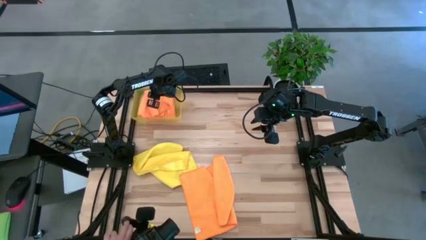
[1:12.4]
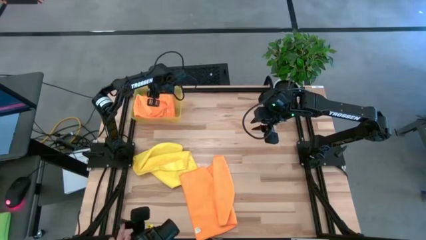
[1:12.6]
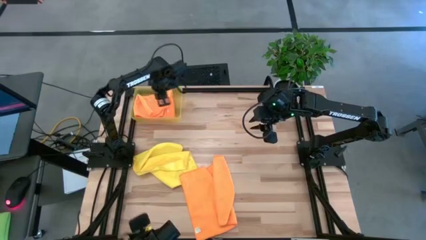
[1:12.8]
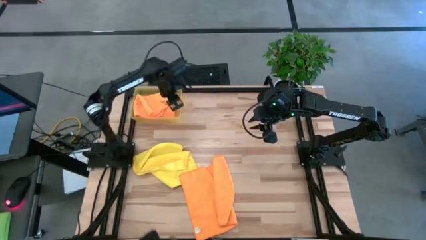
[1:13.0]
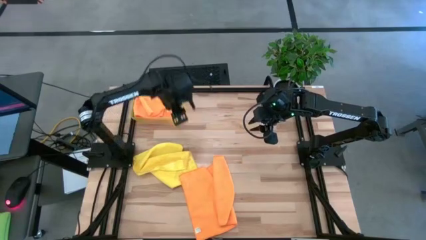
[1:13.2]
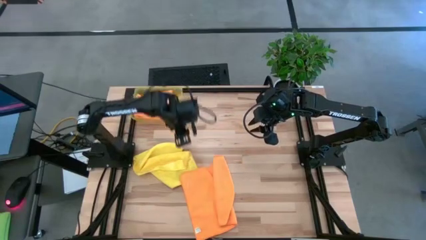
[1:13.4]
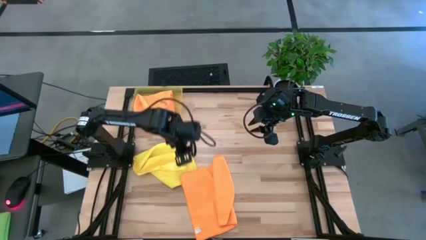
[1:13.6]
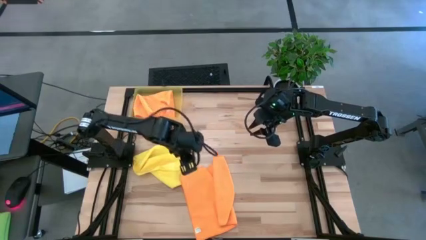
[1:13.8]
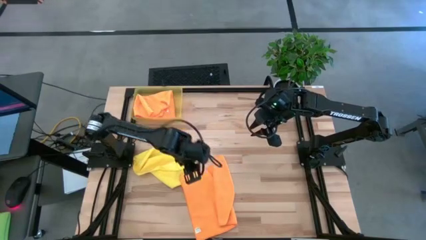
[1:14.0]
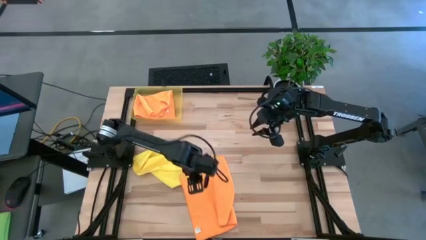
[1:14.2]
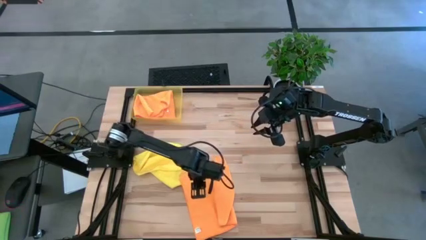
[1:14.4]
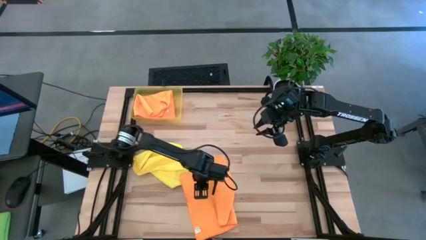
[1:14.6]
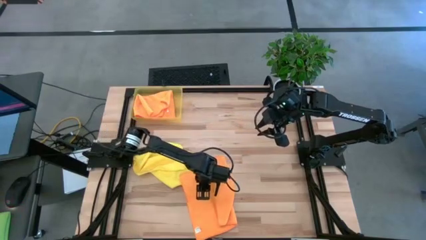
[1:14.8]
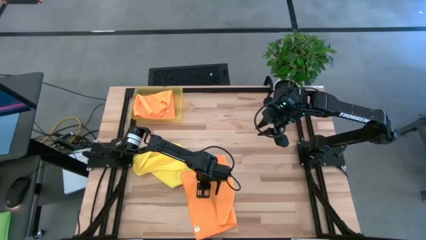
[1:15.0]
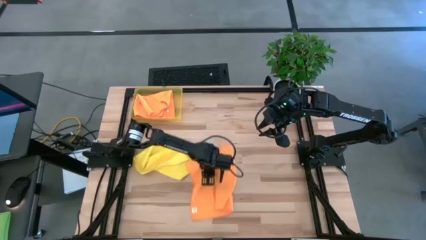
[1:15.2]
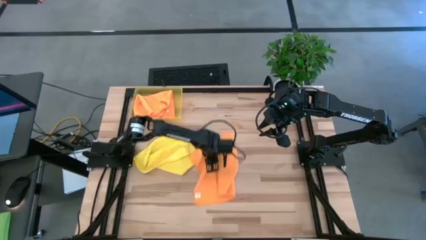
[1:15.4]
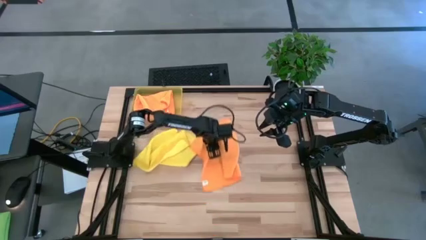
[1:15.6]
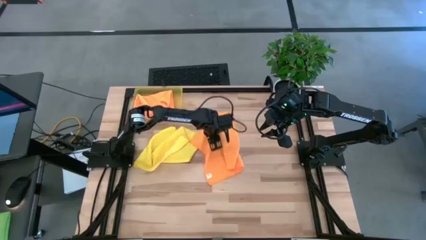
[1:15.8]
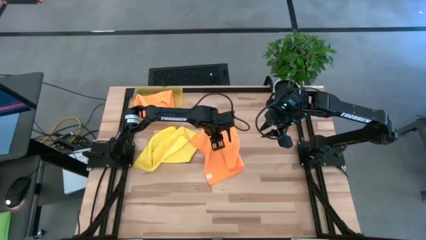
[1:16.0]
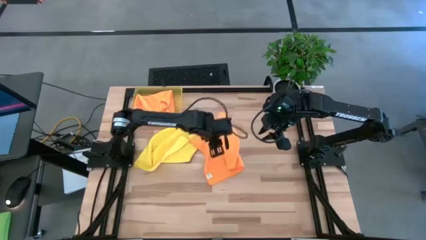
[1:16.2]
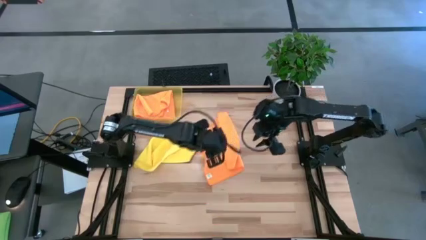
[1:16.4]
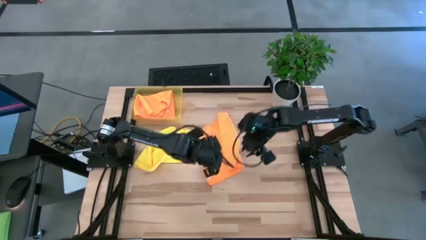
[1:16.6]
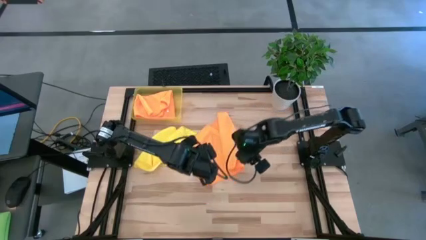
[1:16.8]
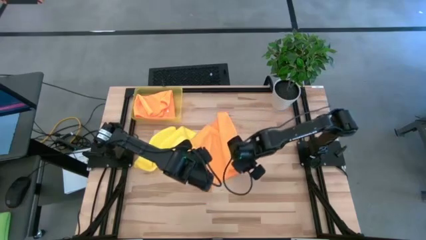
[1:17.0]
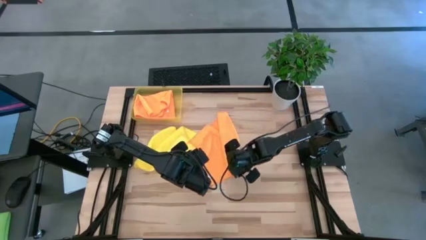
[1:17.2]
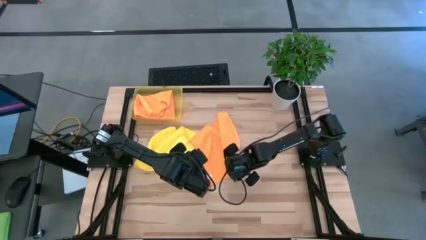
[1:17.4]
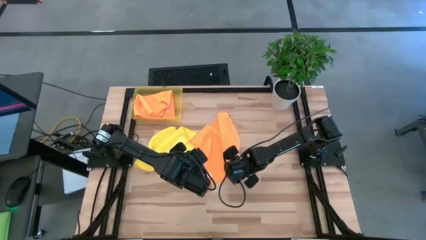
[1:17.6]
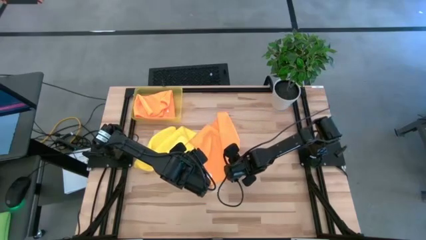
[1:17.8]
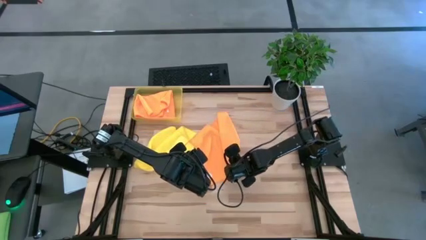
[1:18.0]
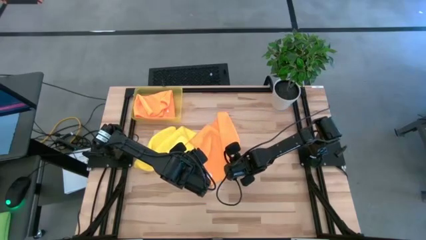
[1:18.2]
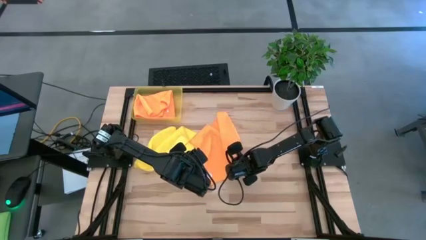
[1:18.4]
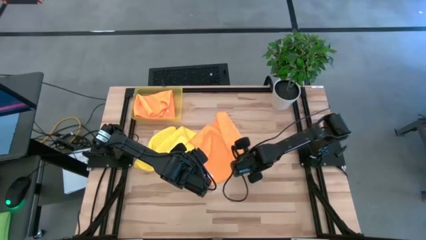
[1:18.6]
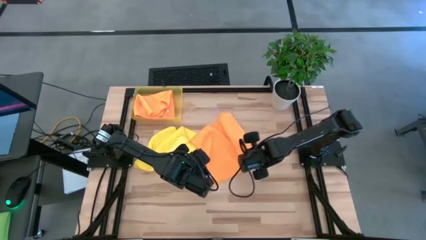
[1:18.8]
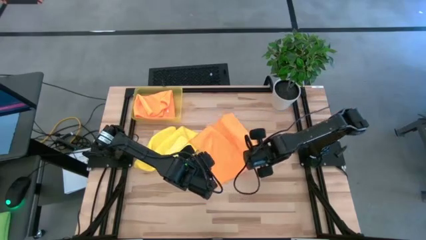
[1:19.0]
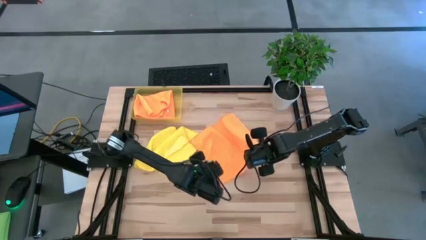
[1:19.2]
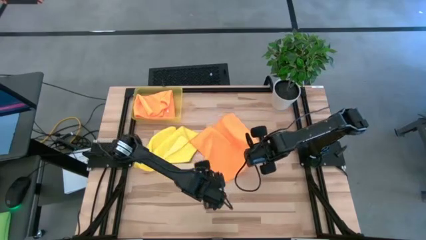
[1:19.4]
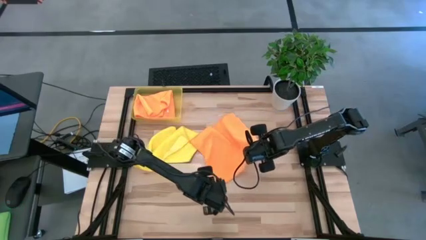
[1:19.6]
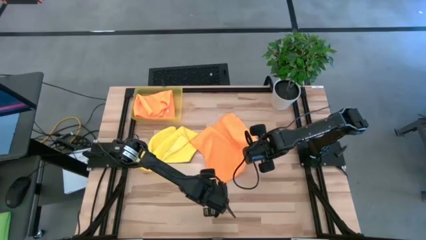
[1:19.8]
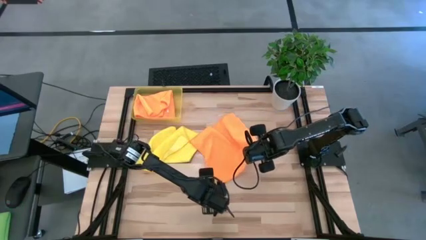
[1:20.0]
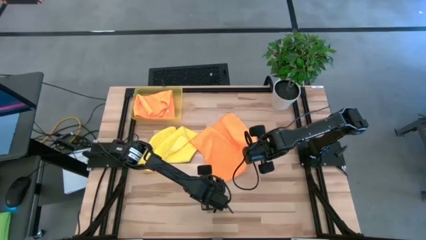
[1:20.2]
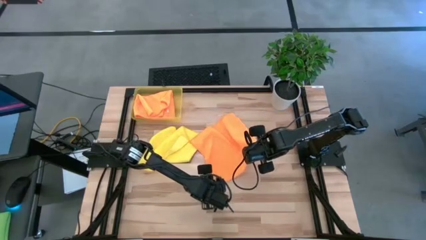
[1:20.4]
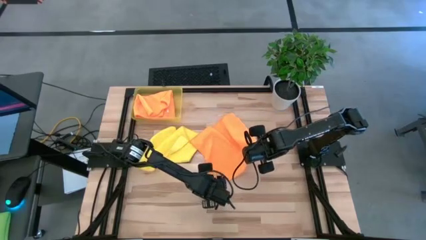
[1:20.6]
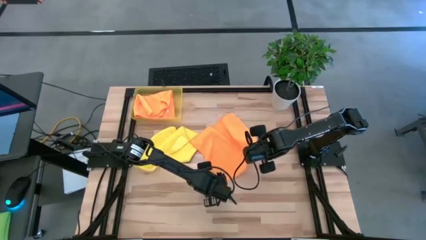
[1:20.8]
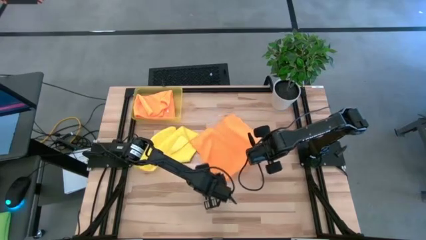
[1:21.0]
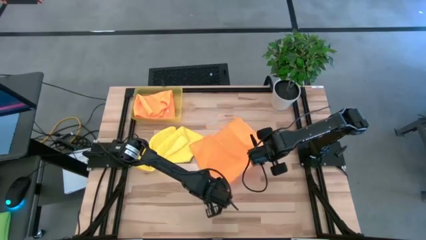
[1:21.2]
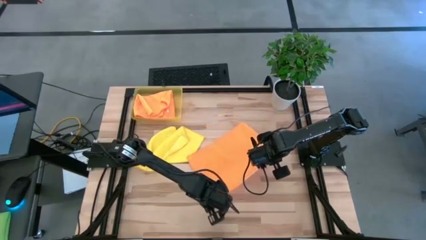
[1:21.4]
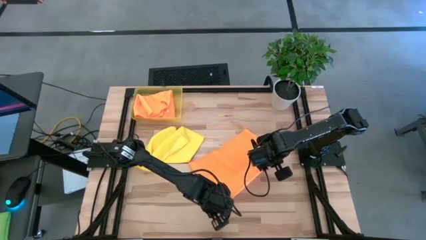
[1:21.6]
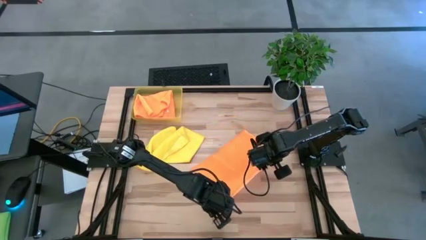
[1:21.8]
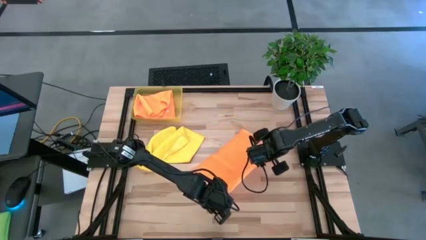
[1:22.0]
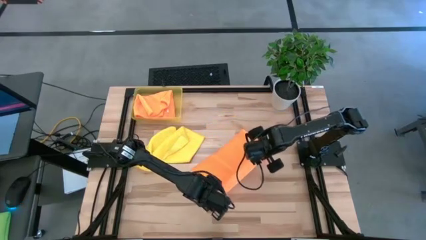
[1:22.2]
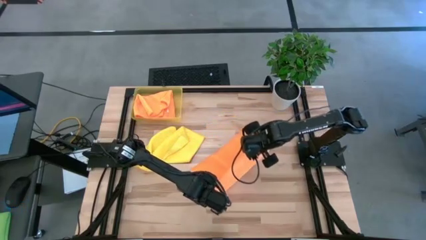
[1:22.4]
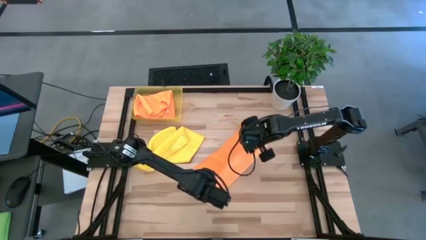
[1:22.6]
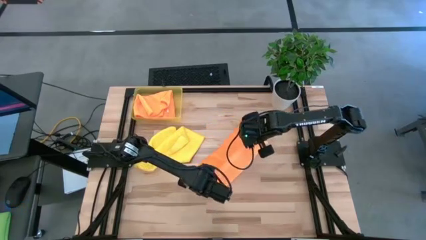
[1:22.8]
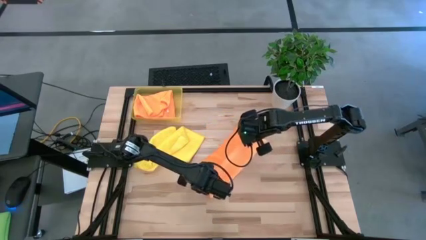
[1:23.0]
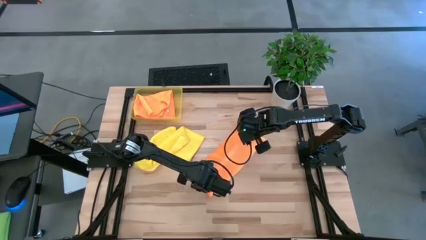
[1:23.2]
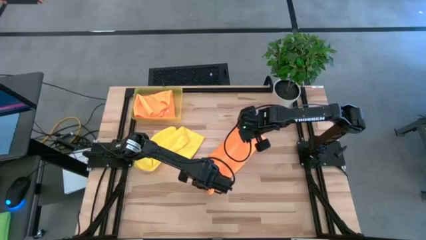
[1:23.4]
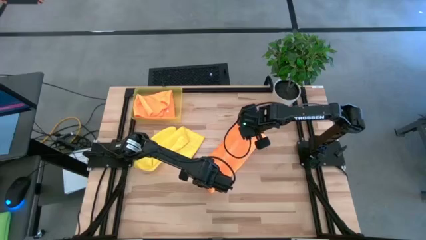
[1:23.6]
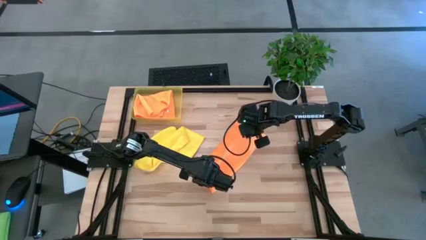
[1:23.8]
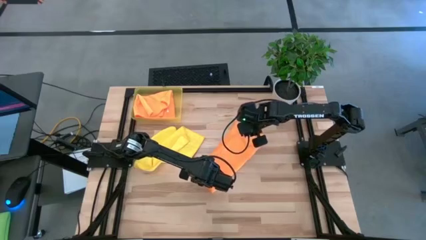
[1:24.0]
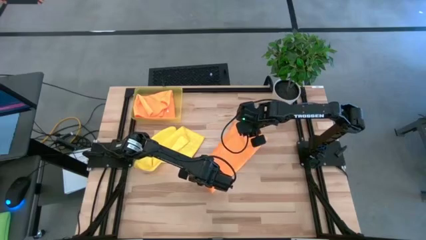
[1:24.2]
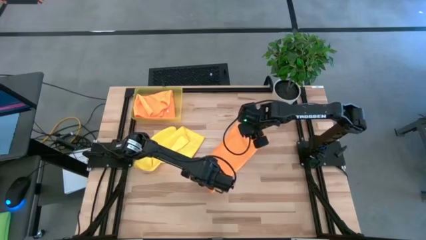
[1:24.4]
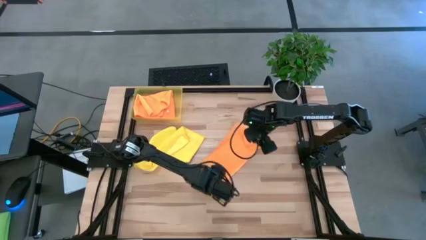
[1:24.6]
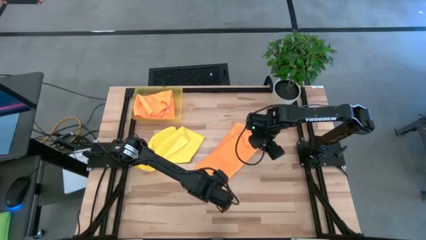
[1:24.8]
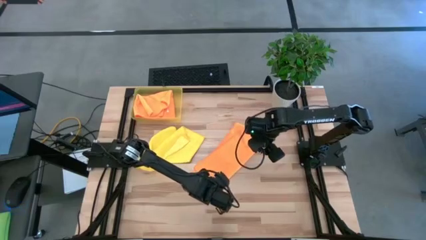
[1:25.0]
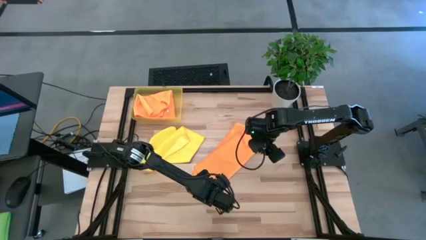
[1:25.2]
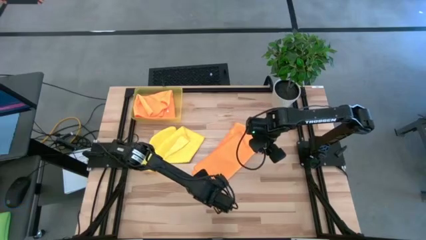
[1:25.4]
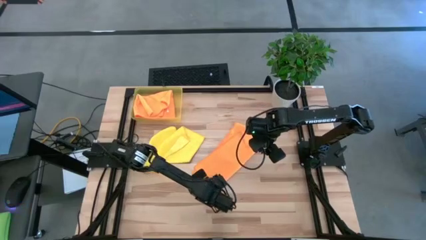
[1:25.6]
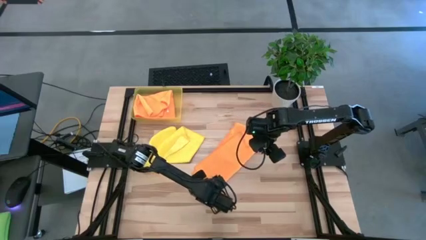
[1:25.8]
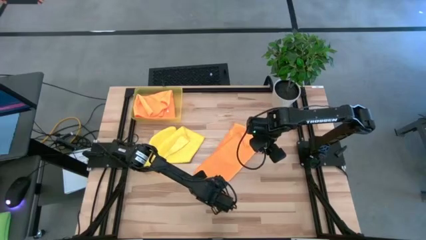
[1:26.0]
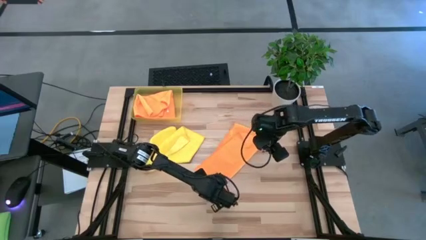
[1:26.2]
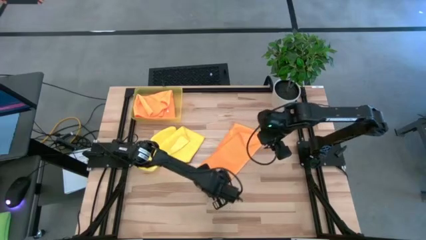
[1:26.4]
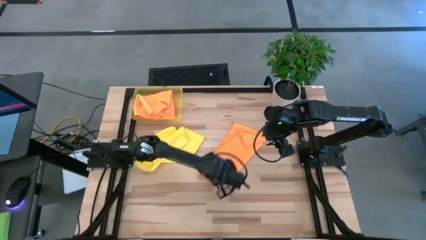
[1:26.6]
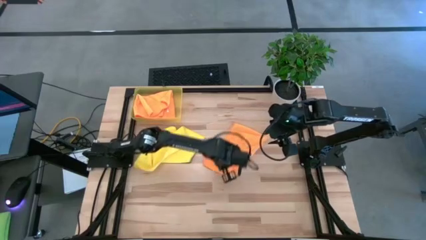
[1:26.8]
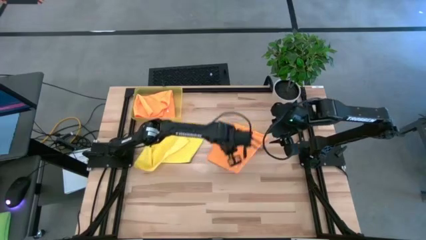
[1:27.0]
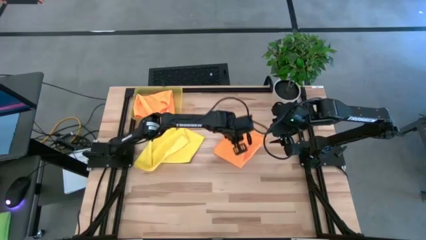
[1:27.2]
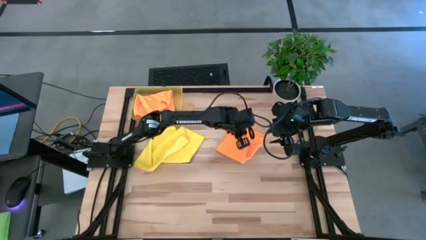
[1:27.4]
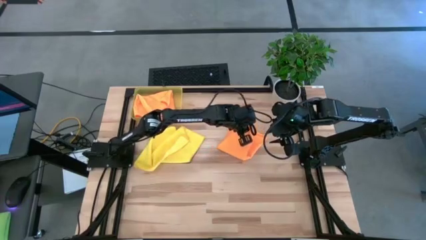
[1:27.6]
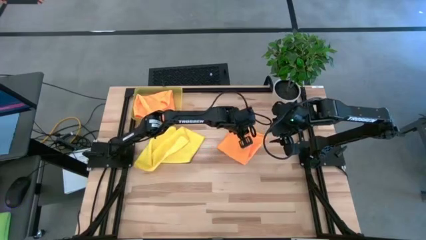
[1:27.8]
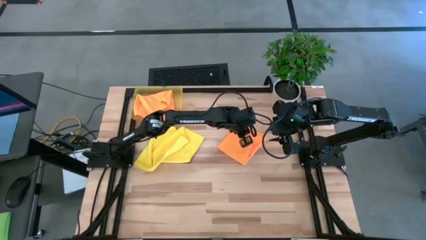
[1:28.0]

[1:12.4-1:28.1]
Task: Fold microfiber towels
Fold the orange microfiber cloth
